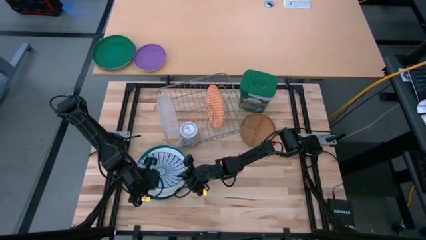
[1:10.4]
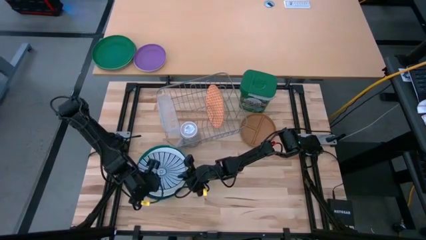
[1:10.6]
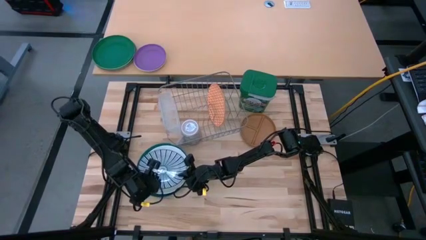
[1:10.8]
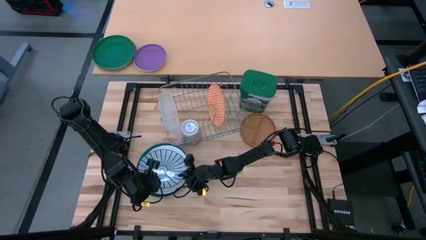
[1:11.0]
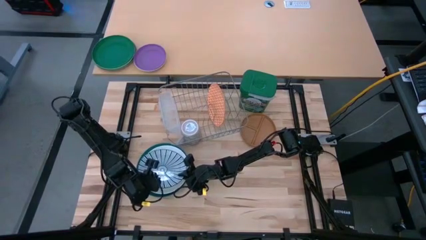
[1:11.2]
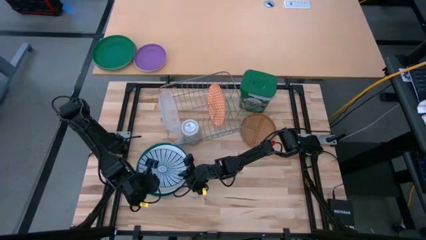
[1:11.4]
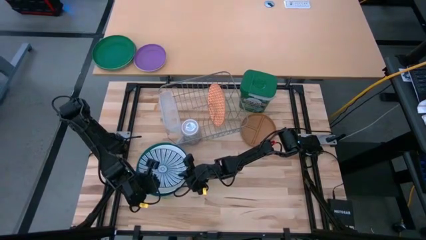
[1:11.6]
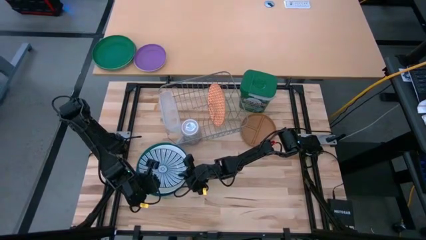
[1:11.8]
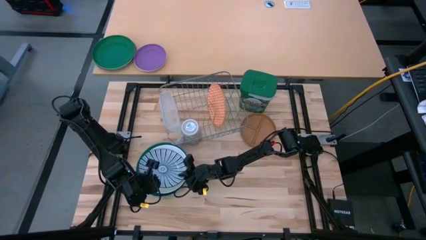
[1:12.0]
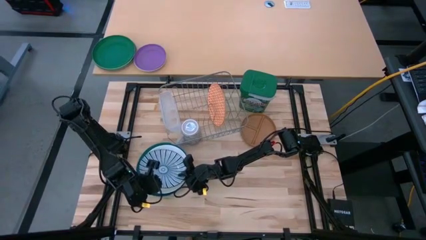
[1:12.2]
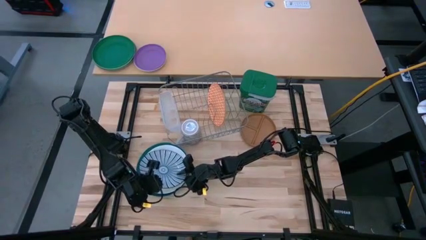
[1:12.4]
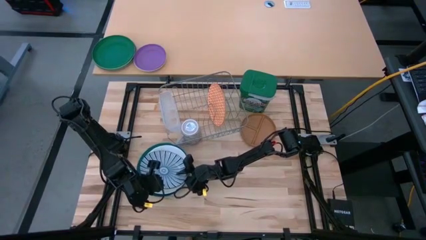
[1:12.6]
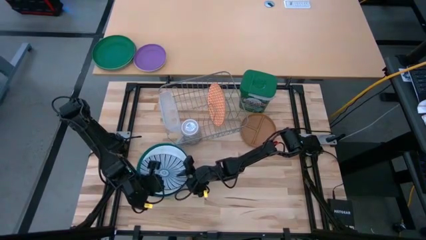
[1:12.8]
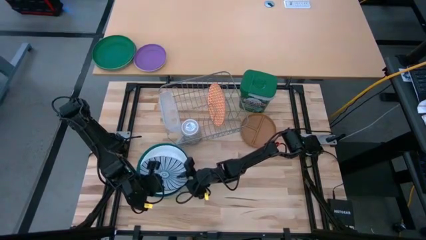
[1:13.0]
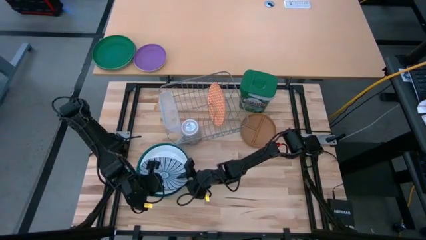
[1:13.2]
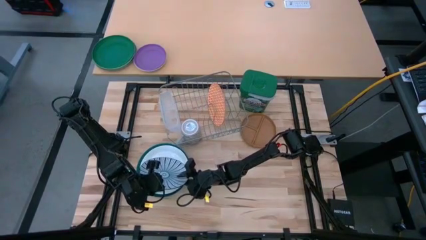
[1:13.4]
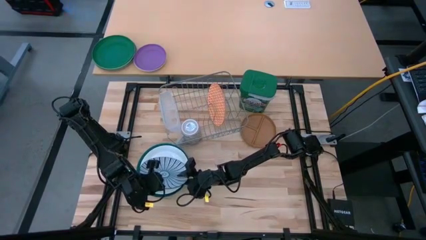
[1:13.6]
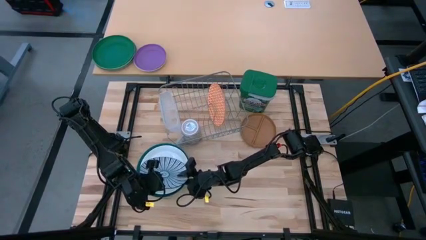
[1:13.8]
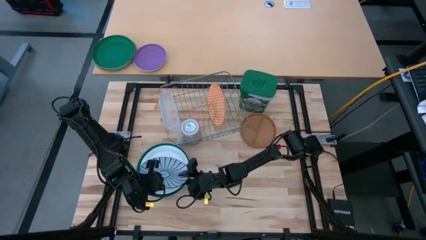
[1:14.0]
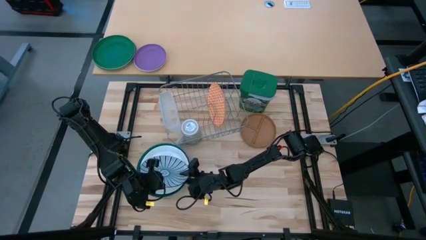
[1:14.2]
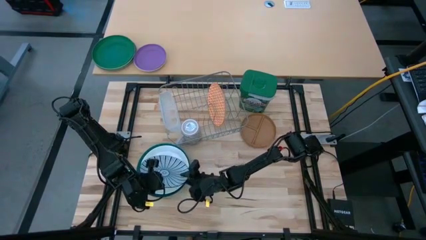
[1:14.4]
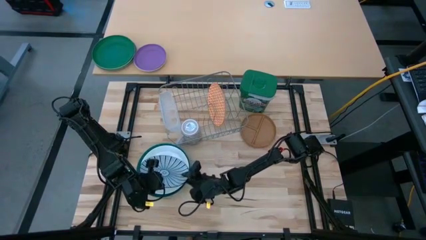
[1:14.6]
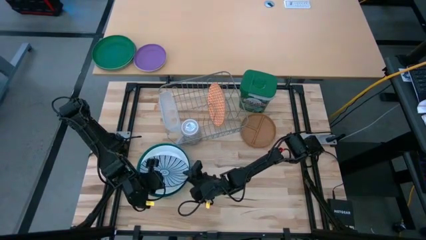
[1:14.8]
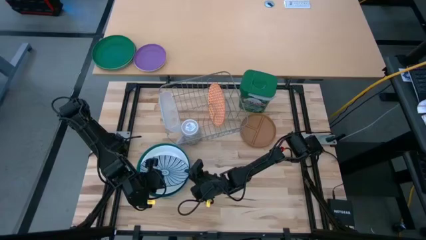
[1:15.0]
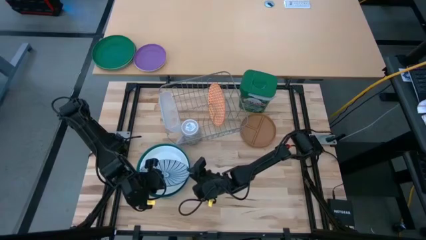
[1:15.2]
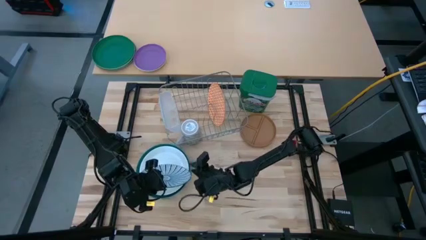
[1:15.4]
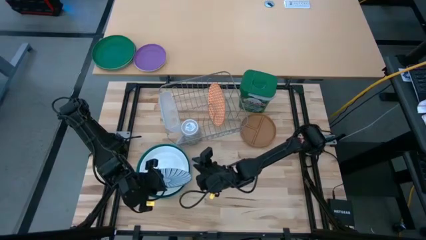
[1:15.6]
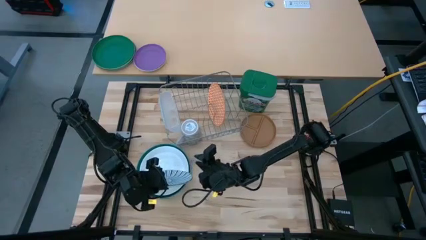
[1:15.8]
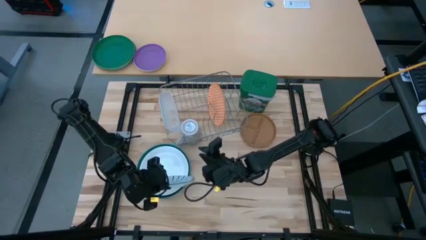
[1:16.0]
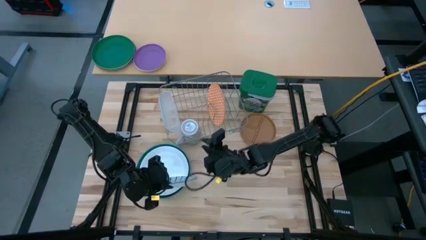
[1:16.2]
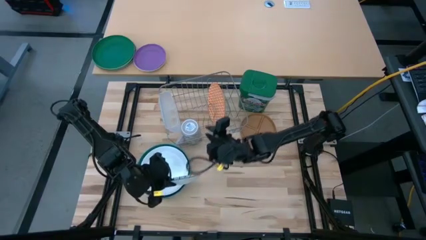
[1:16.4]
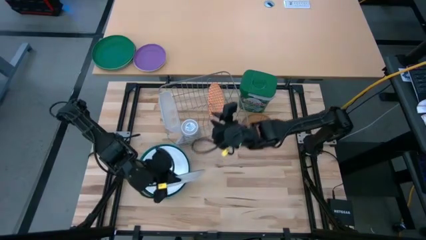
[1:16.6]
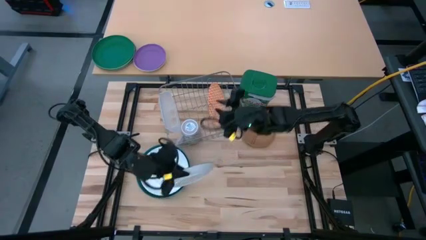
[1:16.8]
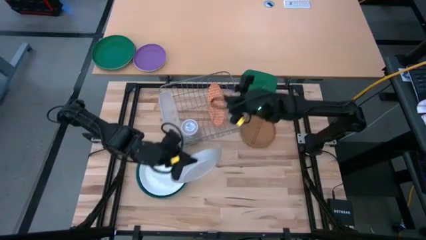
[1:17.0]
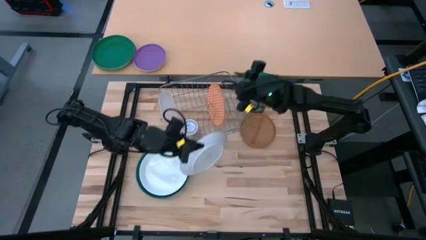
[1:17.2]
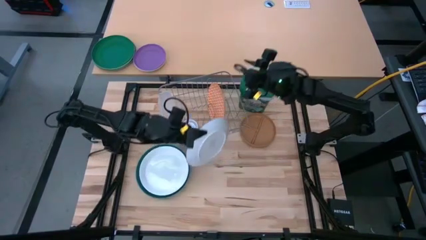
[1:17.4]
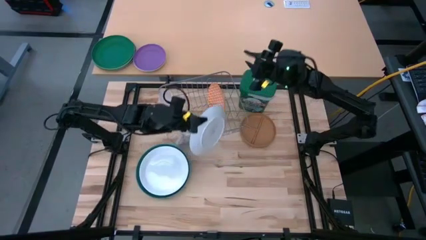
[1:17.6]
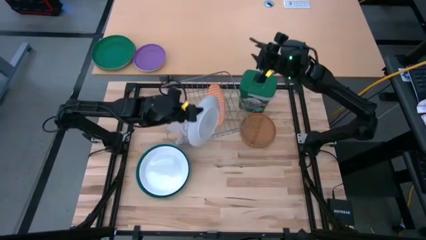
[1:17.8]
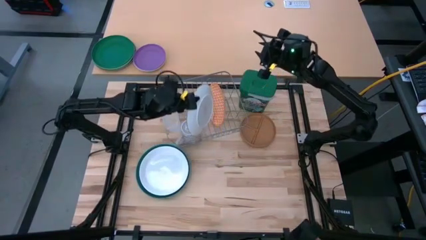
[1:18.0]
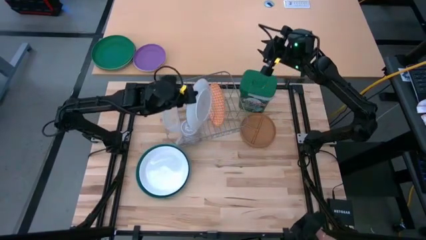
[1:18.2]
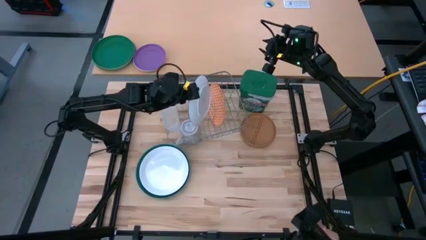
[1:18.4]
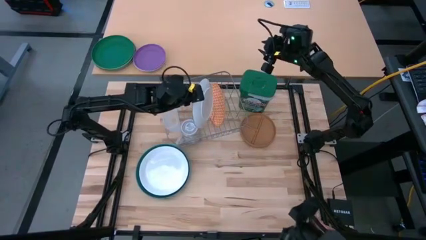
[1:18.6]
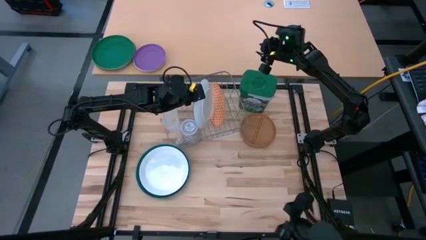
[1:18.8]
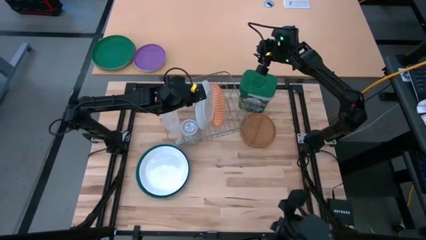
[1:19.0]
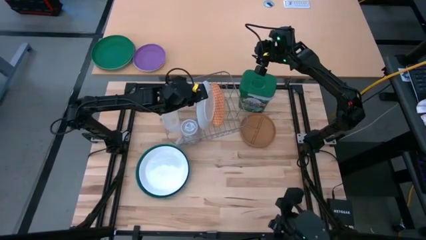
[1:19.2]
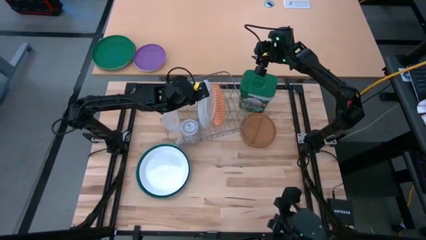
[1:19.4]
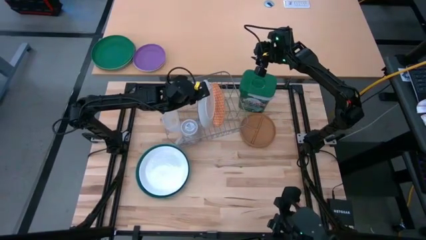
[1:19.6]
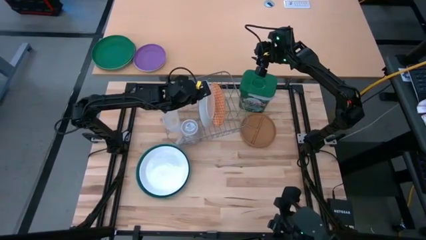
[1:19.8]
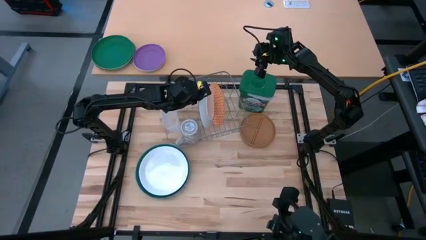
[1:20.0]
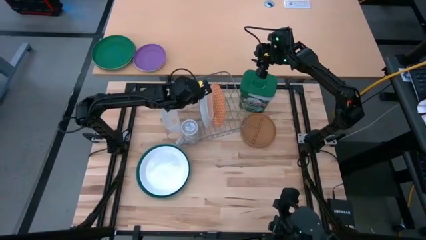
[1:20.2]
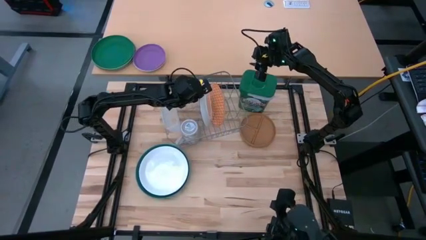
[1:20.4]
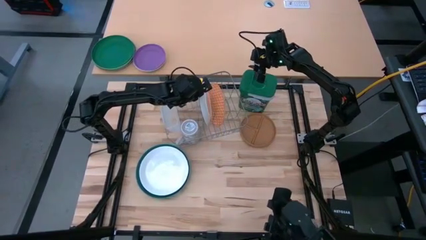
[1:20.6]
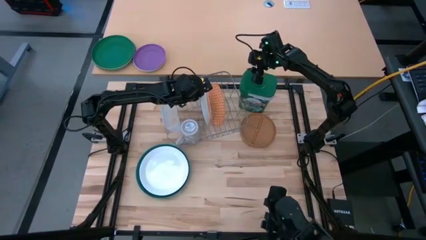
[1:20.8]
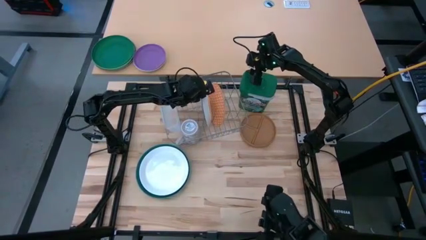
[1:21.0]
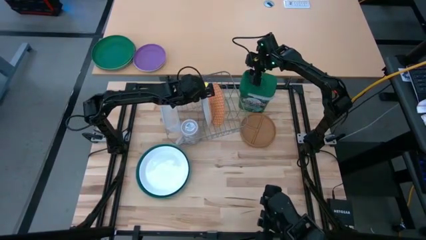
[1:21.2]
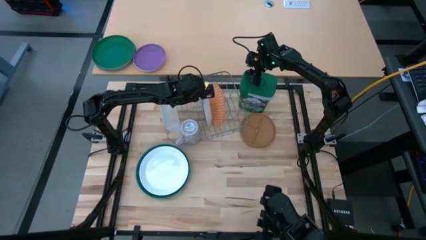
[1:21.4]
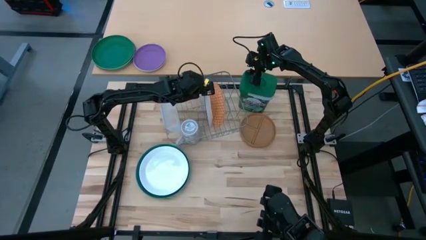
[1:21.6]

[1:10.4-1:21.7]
Task: Sort dishes
Put the blue and white plate in the dish rack

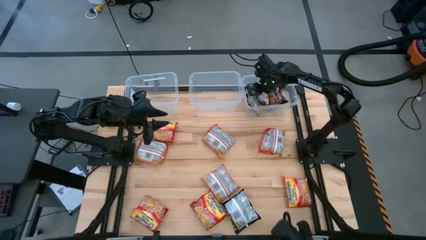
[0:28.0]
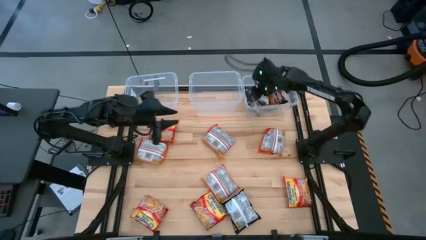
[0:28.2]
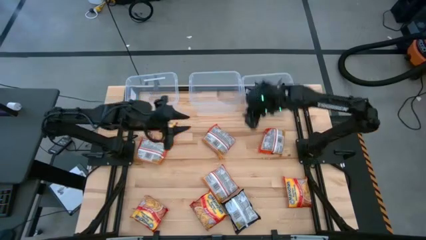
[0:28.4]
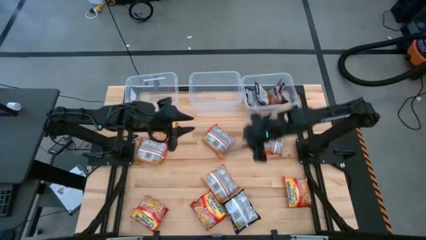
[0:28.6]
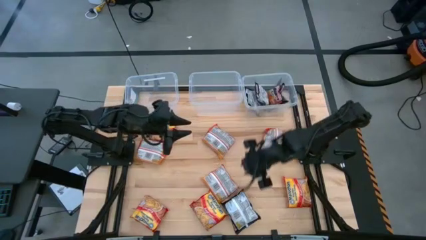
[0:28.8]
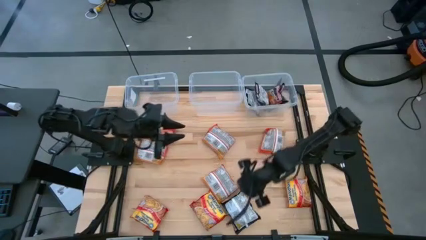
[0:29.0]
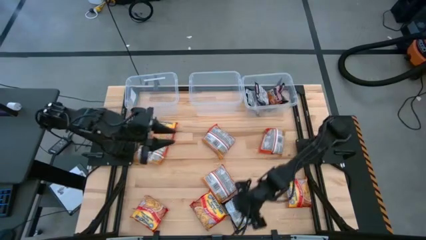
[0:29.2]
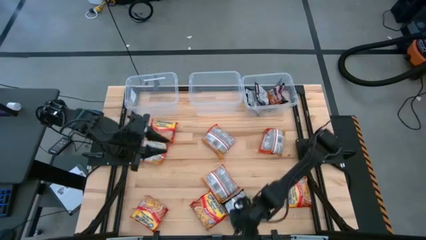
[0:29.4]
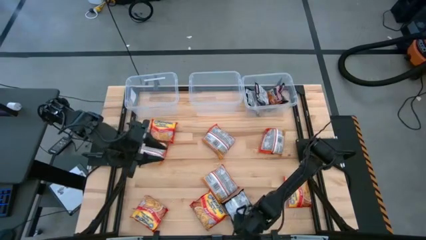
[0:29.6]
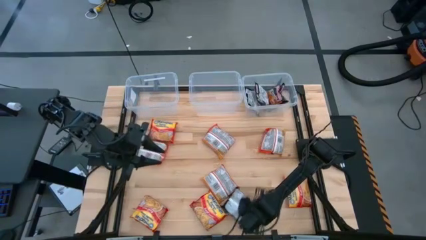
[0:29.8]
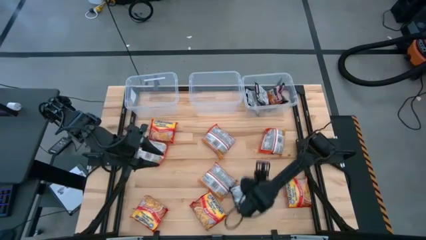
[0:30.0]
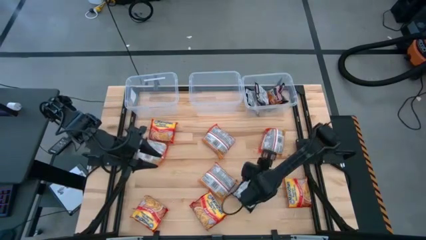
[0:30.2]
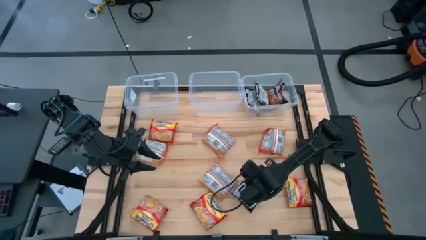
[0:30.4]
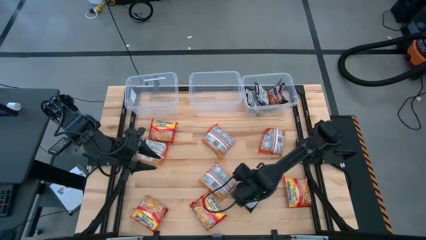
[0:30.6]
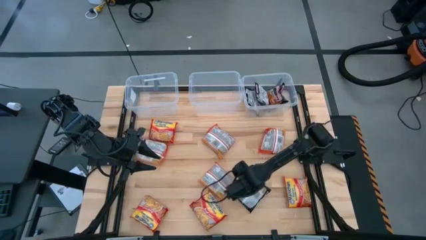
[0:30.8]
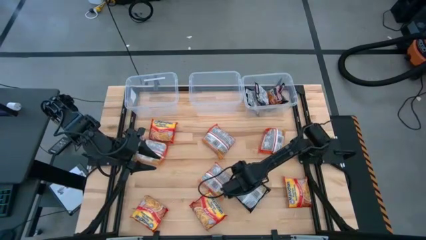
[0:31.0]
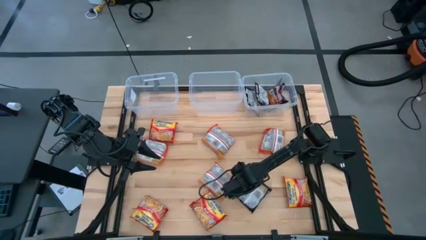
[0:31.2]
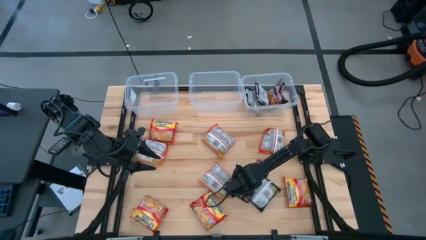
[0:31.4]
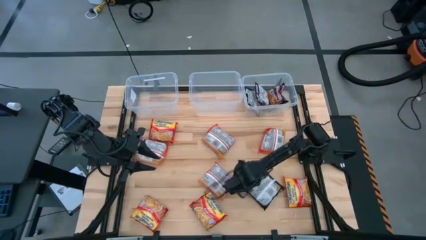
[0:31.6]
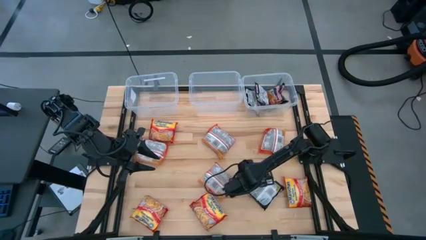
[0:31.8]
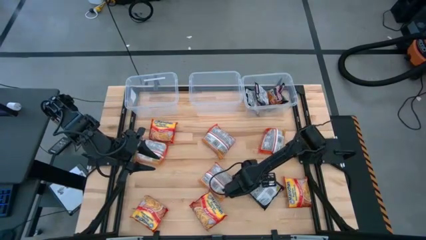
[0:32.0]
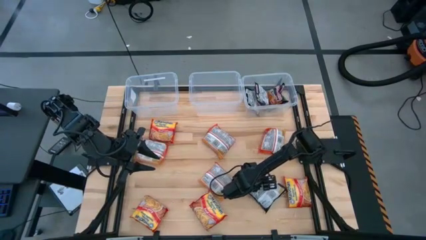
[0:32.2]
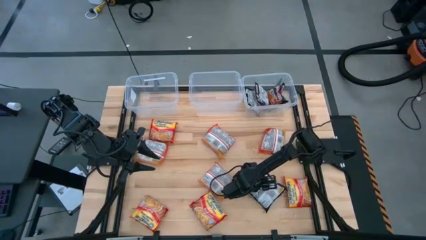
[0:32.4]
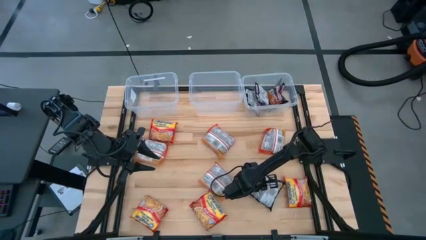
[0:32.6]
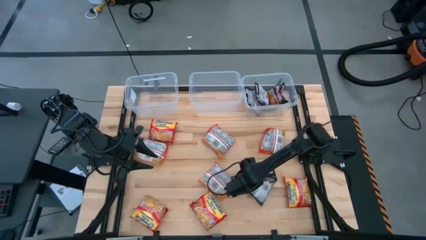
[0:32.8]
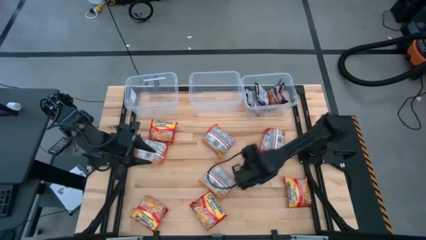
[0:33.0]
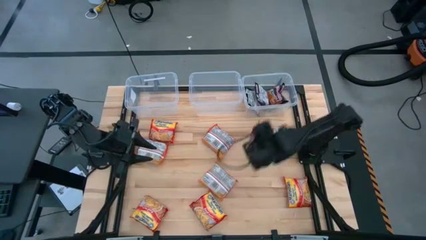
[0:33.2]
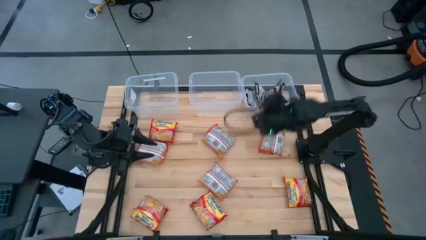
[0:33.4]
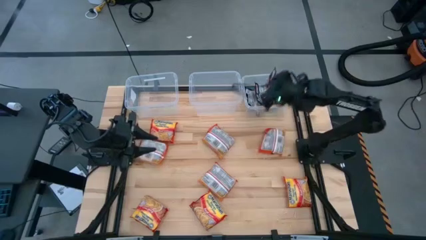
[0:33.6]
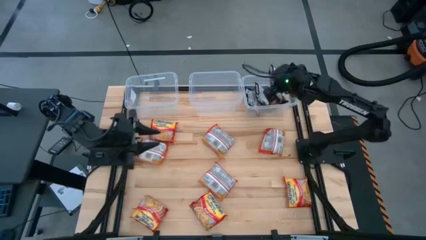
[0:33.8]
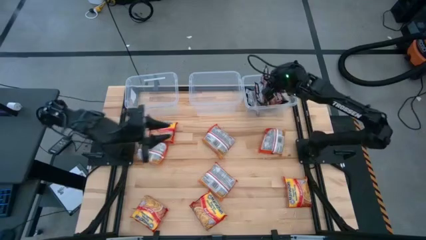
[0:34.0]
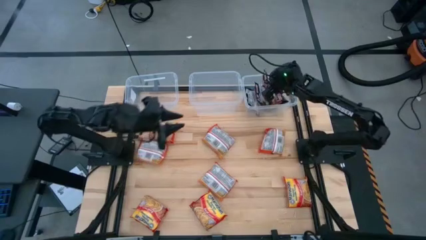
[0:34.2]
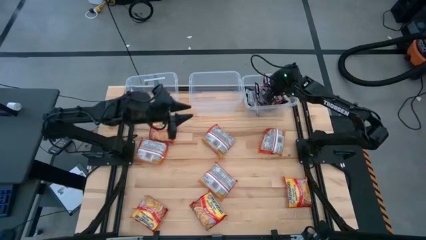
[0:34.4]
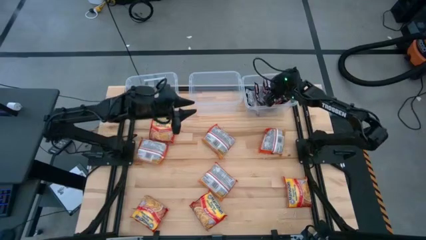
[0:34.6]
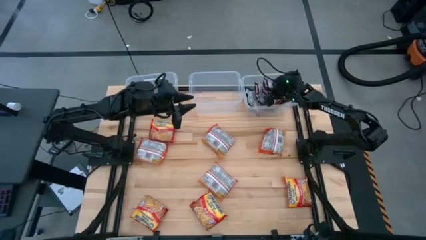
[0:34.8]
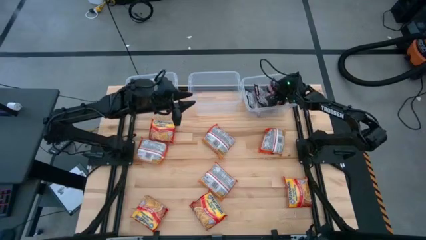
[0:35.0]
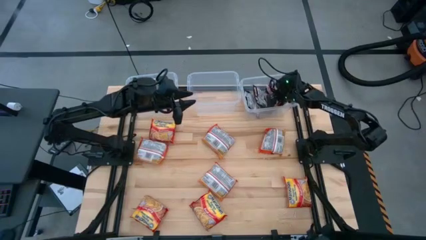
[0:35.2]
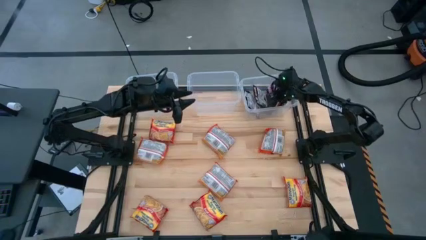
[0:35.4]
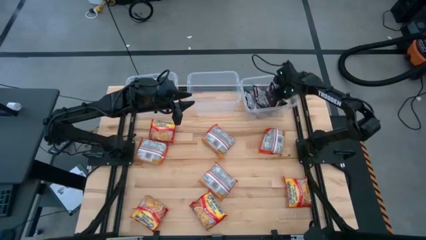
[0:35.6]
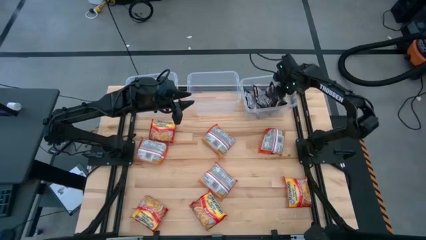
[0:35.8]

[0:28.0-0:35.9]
Task: Sort Maruchan noodles
Put the black noodle pack into the top right transparent bin
